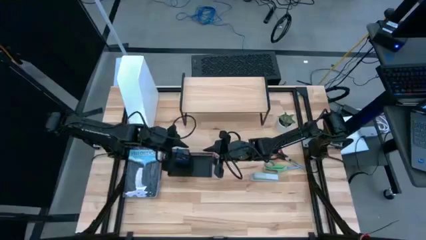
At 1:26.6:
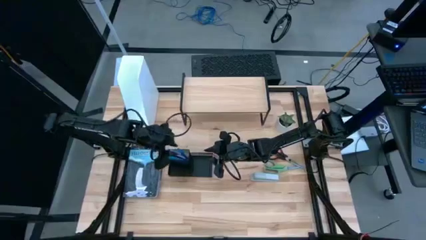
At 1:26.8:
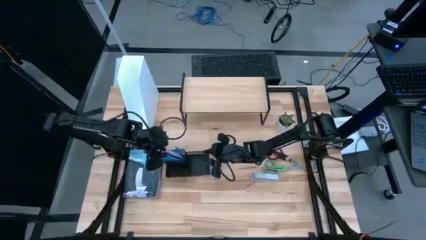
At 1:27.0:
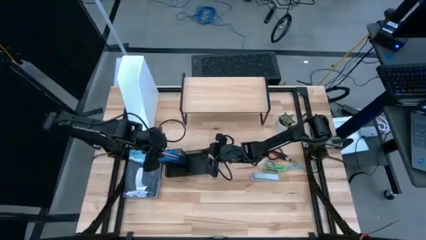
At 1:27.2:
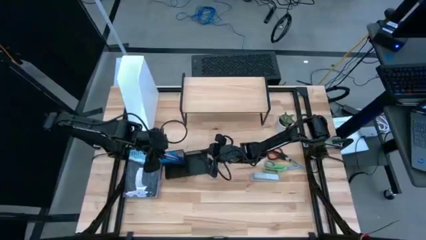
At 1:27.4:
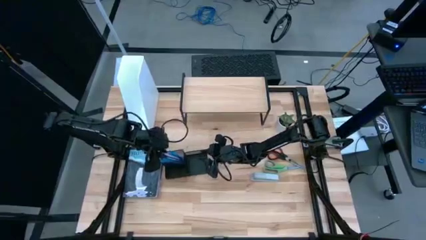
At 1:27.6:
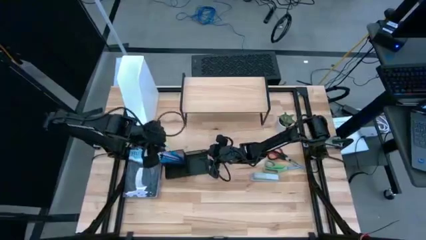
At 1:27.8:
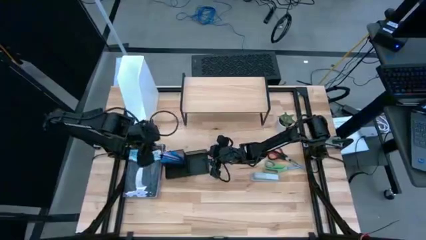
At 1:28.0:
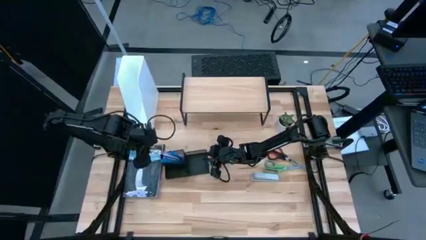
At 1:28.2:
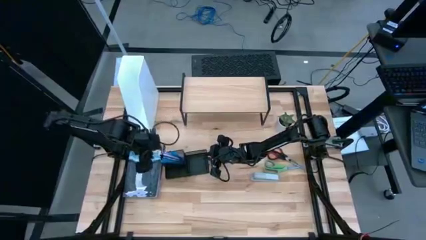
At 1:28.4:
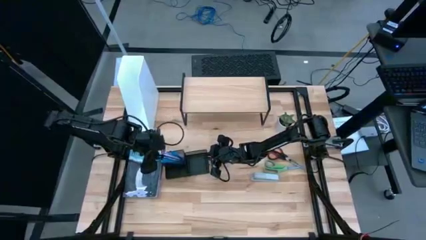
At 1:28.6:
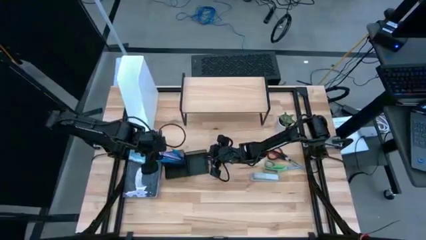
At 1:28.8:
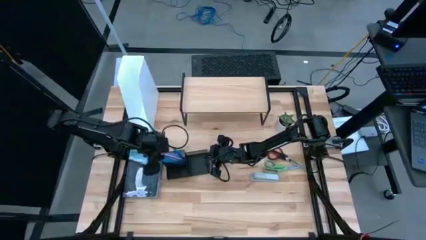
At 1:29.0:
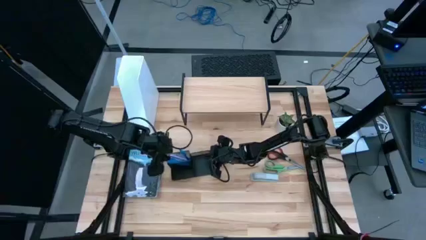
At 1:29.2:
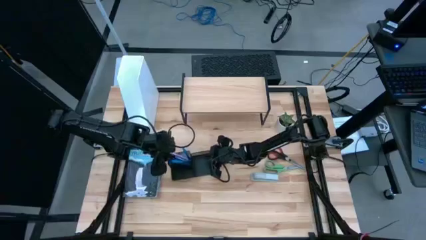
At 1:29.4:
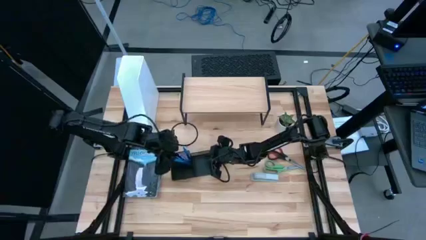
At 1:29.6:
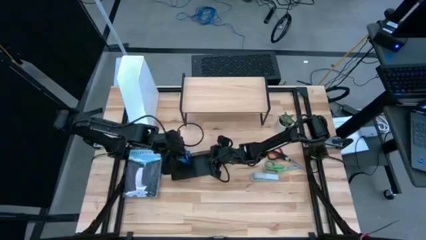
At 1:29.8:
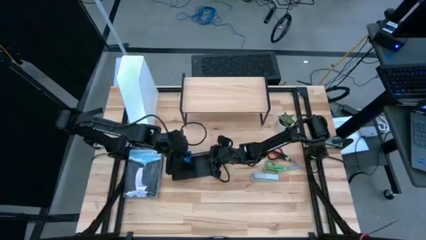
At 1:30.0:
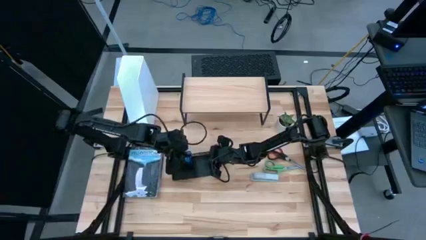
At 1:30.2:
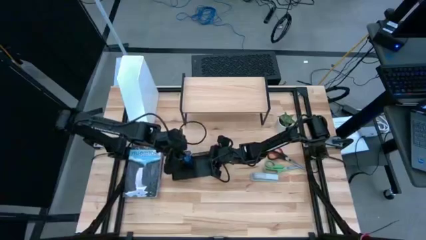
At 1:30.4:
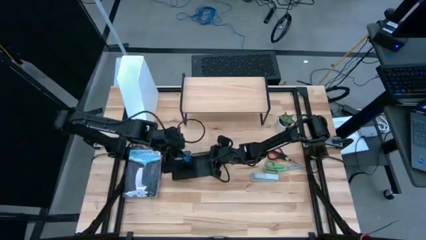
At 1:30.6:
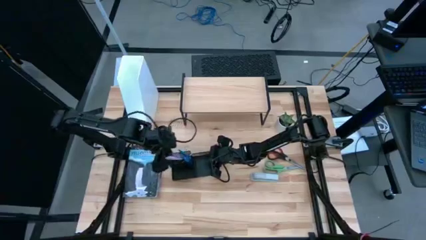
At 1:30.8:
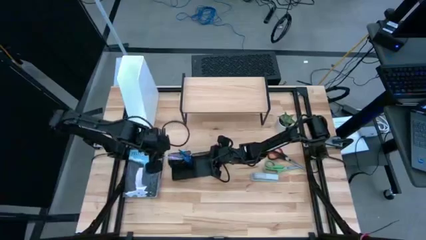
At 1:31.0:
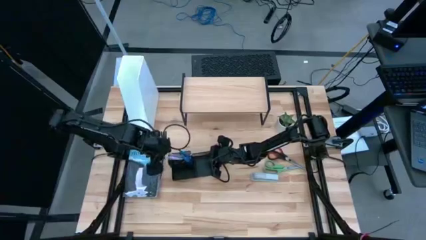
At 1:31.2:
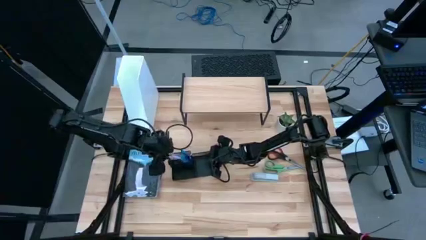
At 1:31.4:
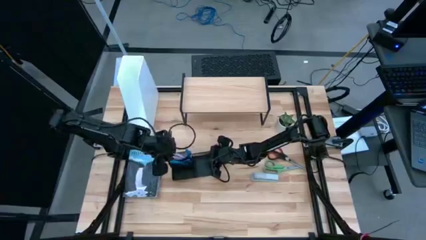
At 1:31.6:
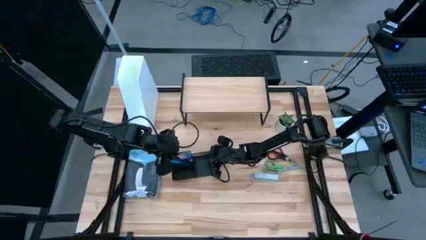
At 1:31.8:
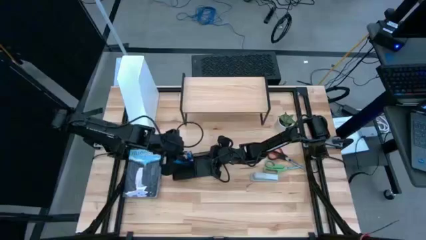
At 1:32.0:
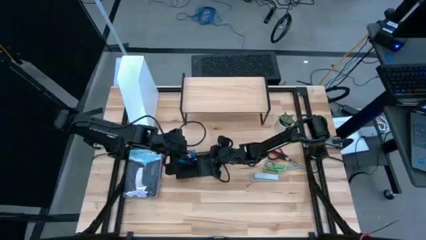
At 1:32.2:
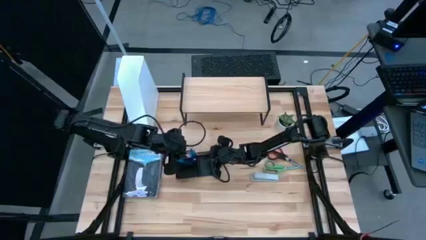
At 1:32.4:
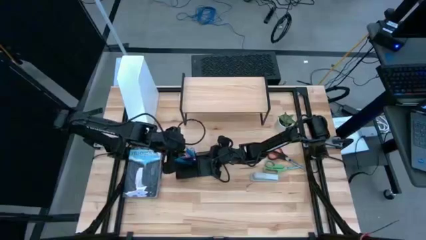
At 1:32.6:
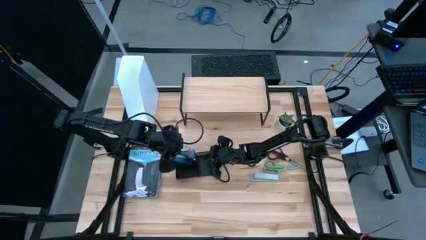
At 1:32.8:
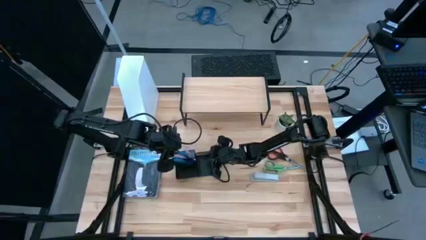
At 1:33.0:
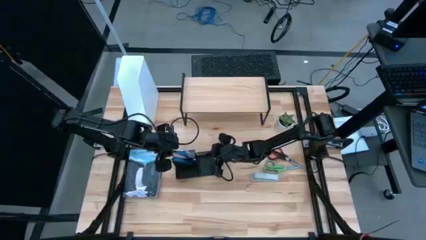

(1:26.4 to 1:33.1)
Task: Stock shelves
Adjust the pens in the desk organizer

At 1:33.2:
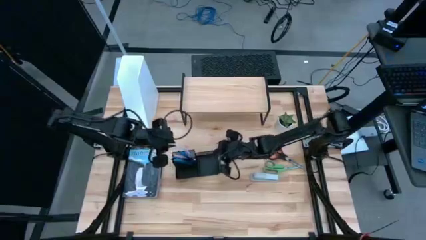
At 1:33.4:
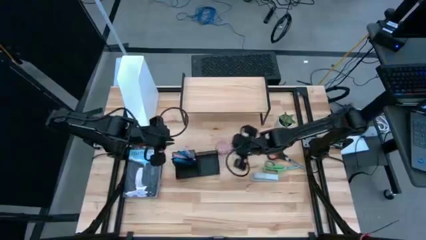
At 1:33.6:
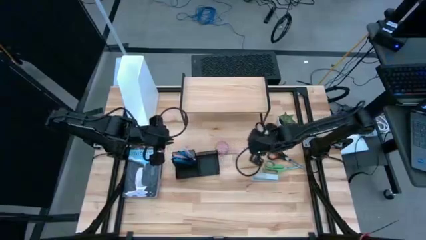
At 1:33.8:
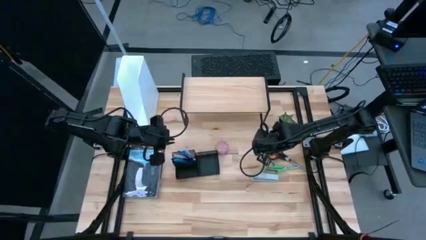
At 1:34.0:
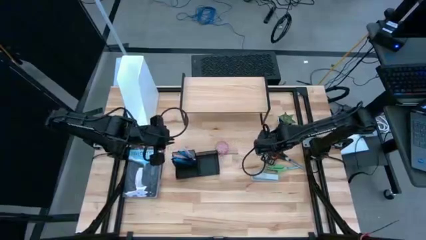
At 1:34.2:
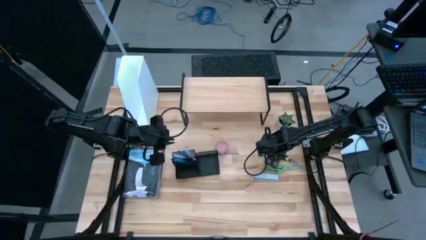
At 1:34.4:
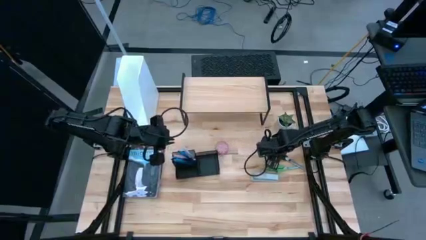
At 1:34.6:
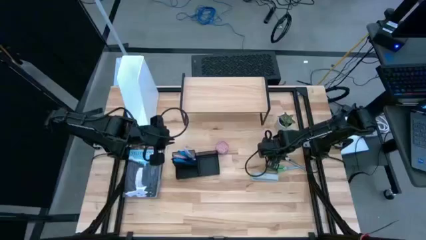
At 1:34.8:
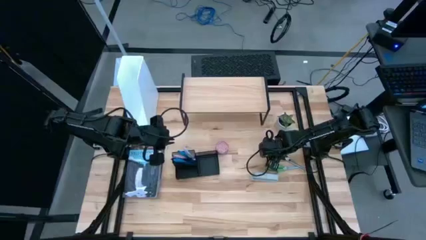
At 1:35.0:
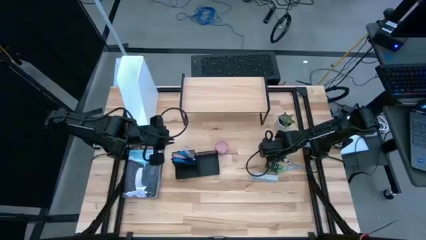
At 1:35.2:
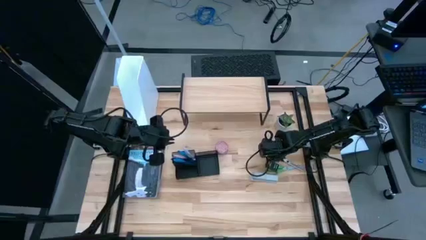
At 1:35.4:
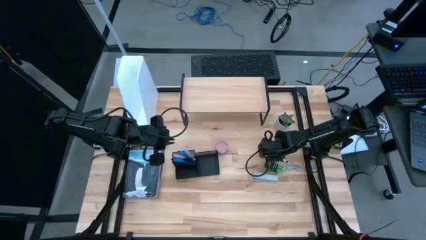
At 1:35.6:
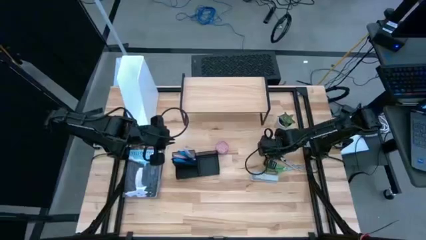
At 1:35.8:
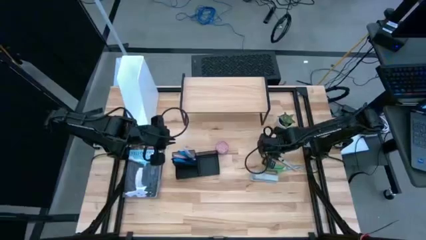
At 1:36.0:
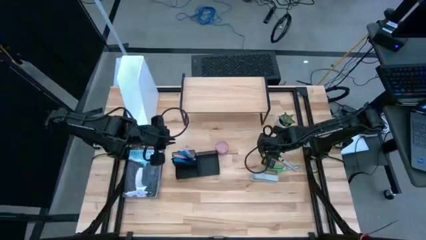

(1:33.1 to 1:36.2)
Put the black scissors into the desk organizer

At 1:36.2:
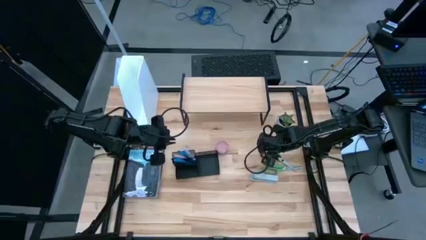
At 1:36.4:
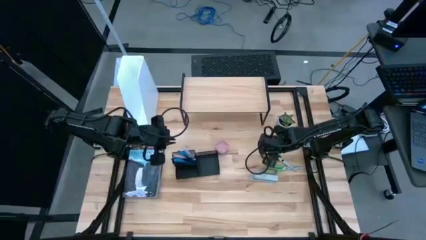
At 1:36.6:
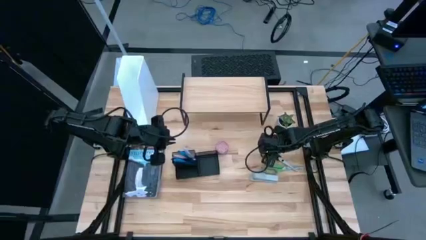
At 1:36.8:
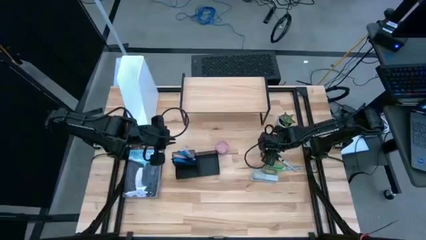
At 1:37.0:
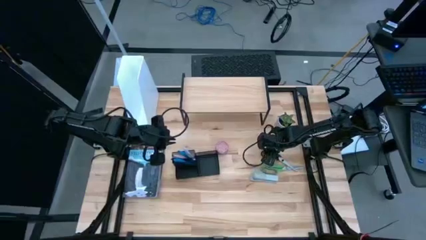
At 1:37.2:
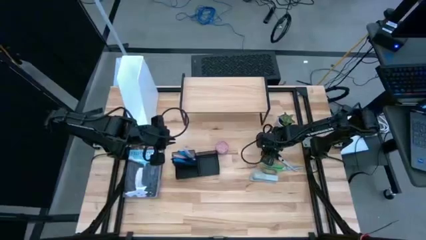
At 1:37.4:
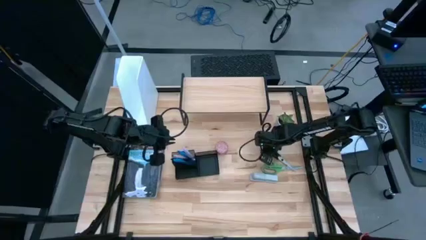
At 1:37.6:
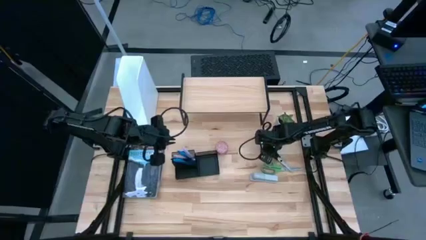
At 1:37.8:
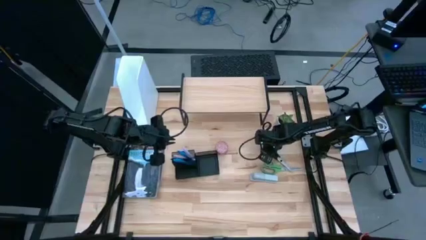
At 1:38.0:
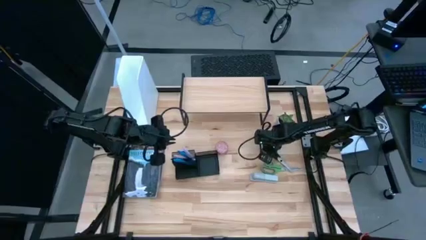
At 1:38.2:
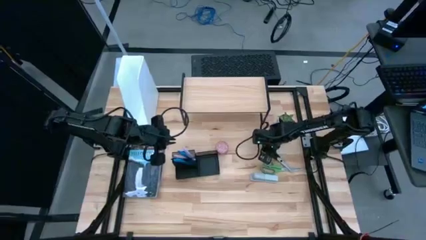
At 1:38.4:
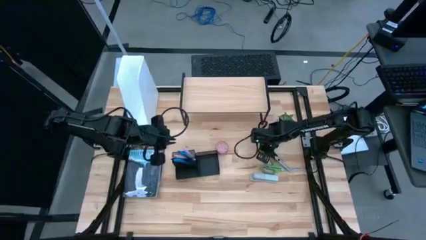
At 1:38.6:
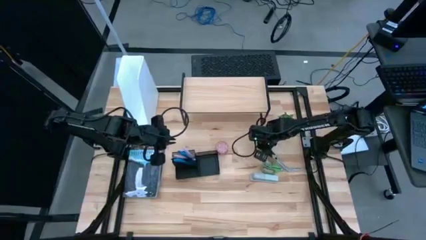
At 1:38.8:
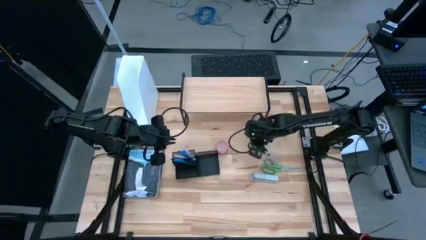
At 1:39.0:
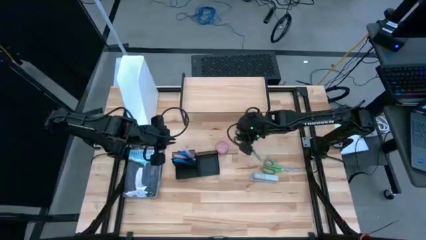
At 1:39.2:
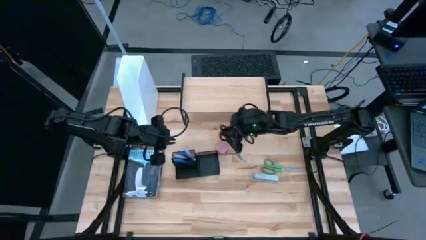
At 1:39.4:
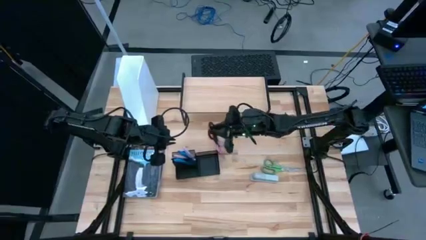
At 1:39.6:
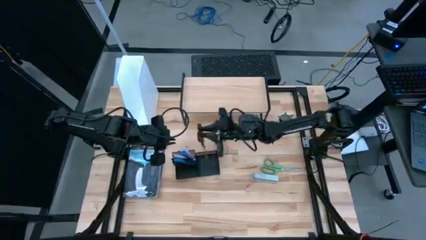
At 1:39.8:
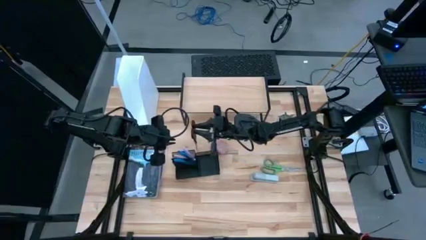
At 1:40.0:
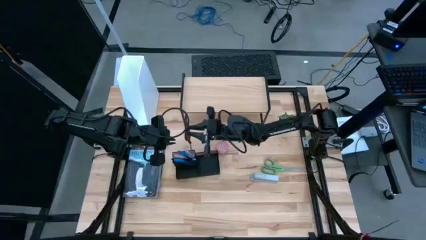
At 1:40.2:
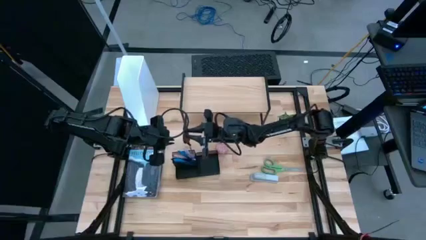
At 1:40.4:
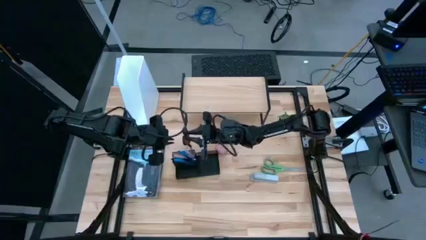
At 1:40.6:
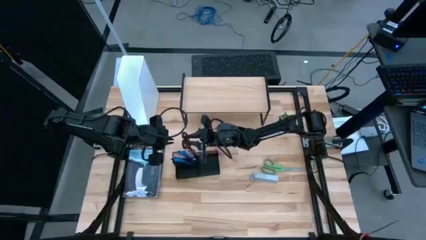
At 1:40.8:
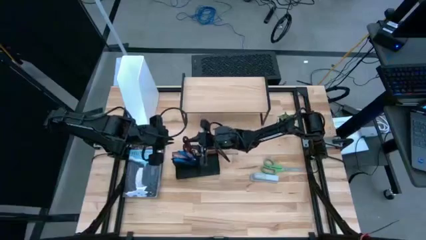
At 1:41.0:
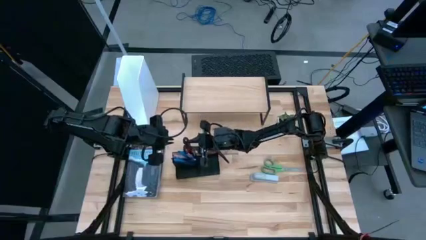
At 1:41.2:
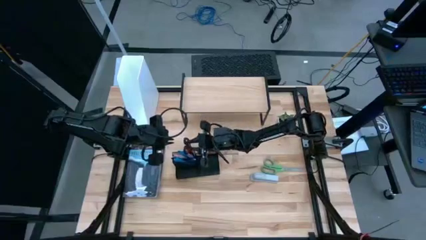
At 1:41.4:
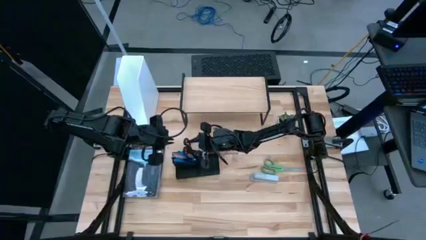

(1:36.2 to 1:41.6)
Put the black scissors into the desk organizer
